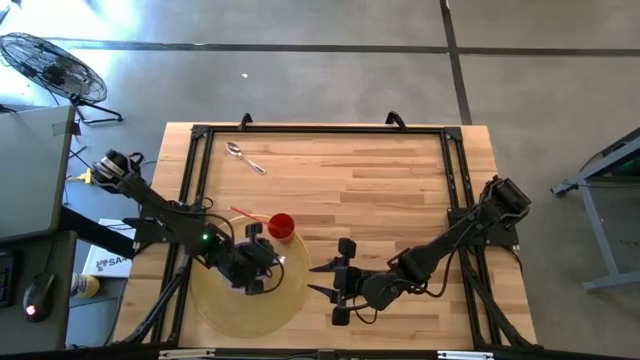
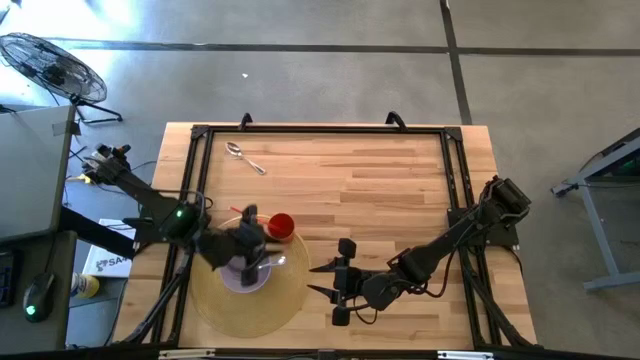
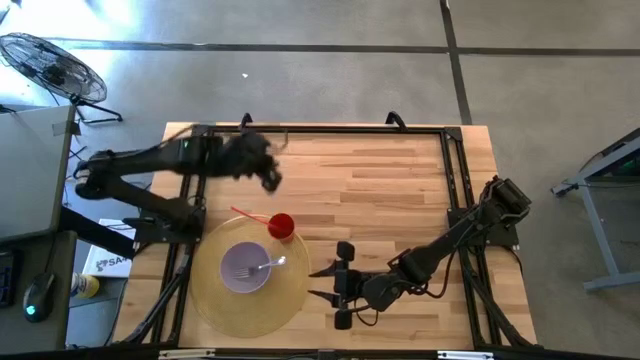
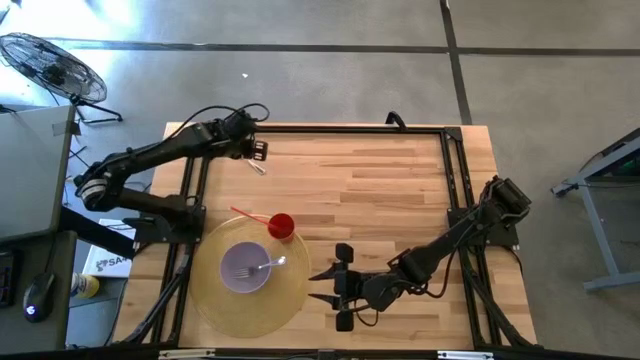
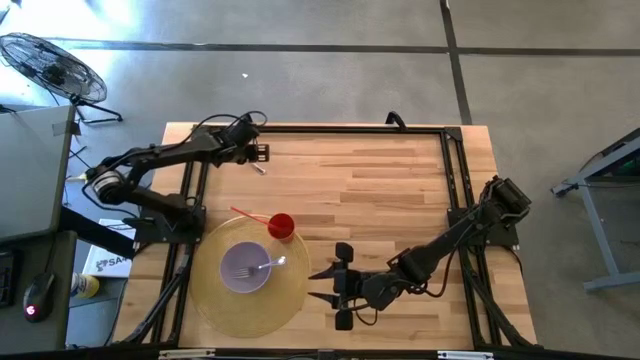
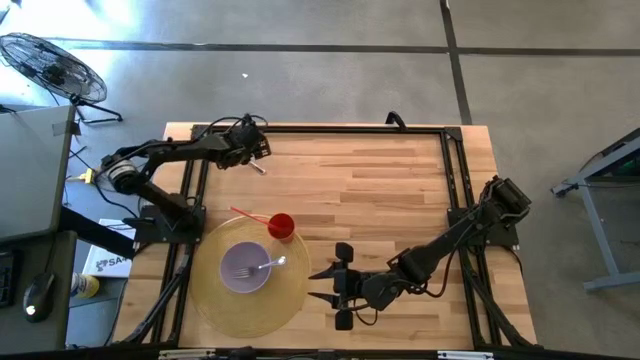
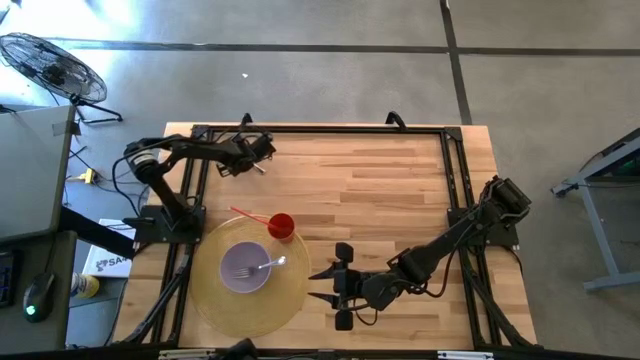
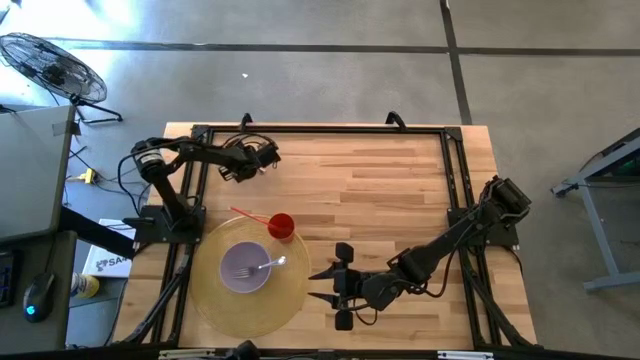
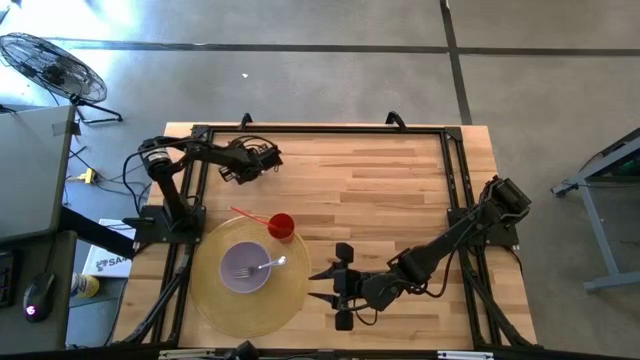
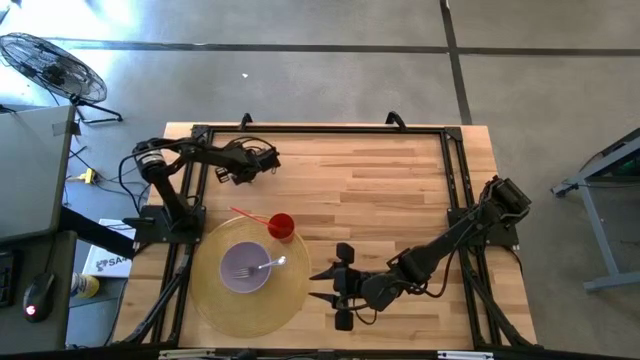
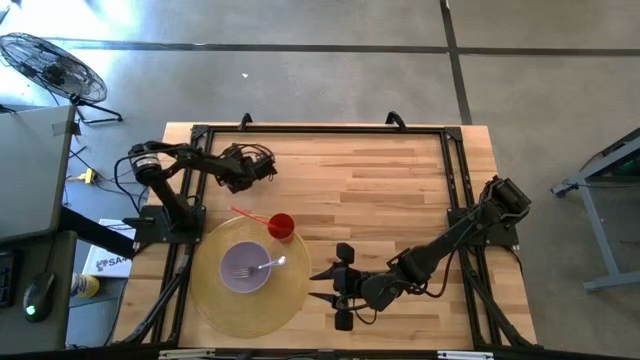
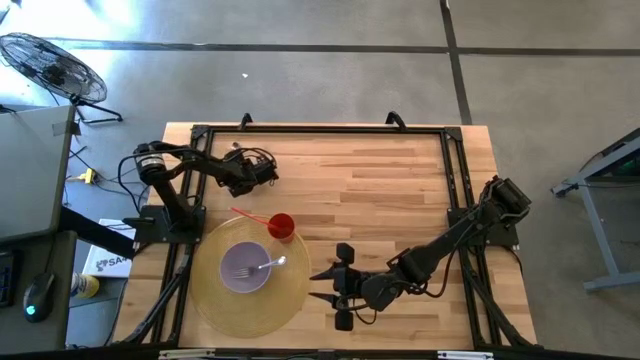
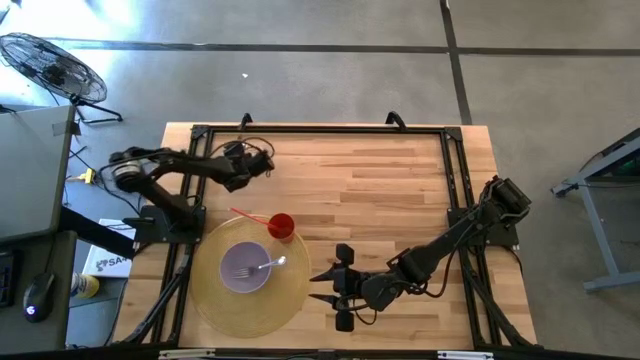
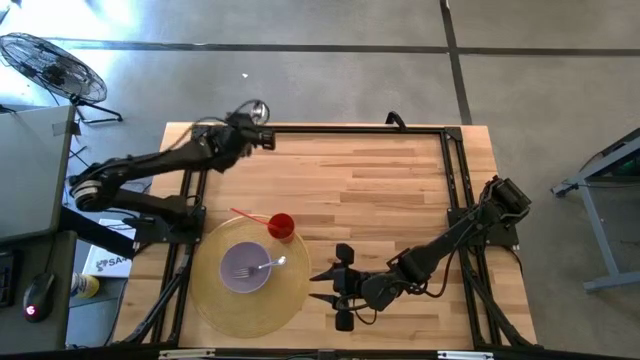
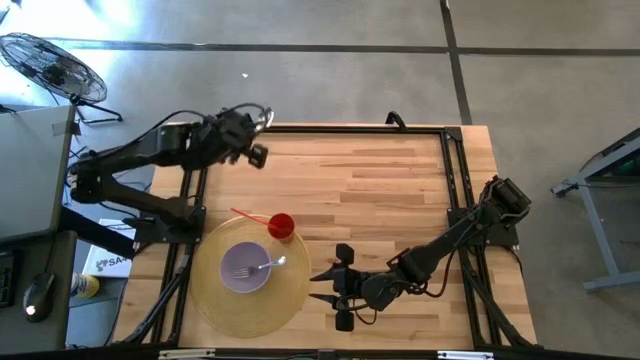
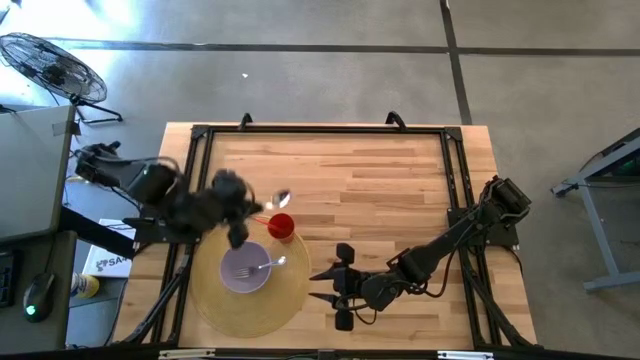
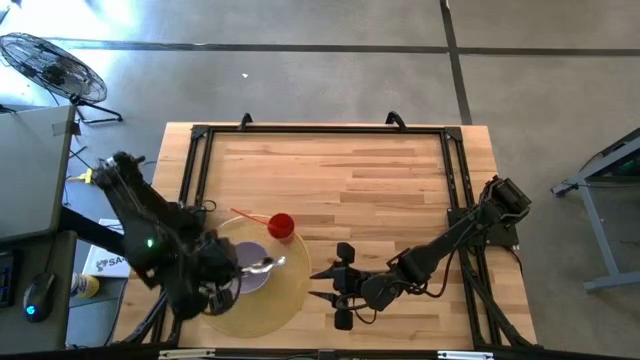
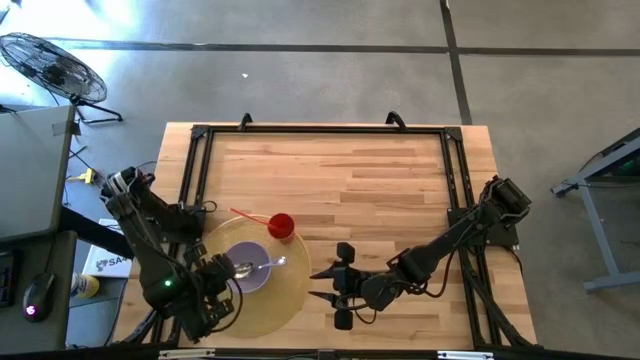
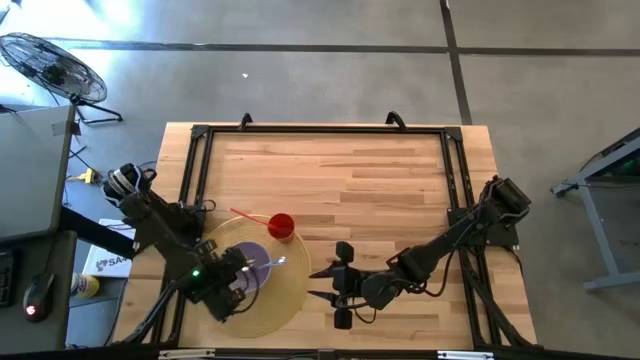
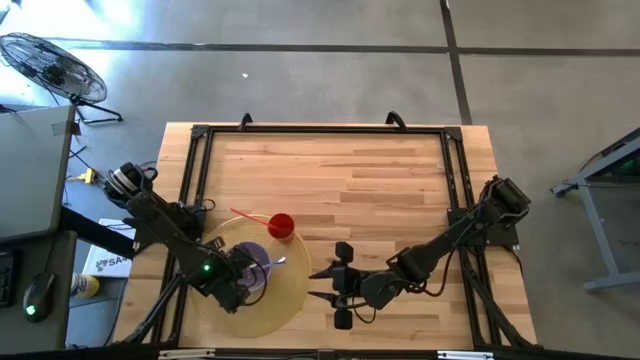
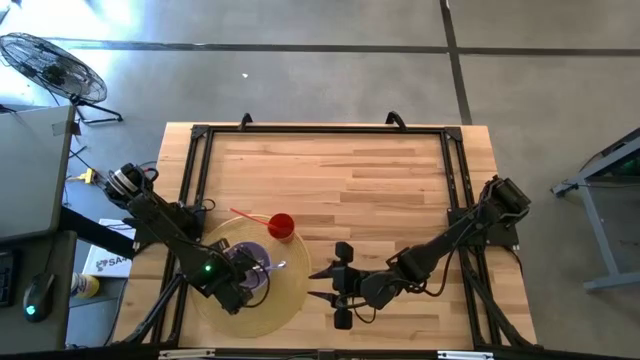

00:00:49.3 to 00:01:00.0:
Task: Pick & Place Utensil
Put the silver spoon into the purple bowl on the brown mat

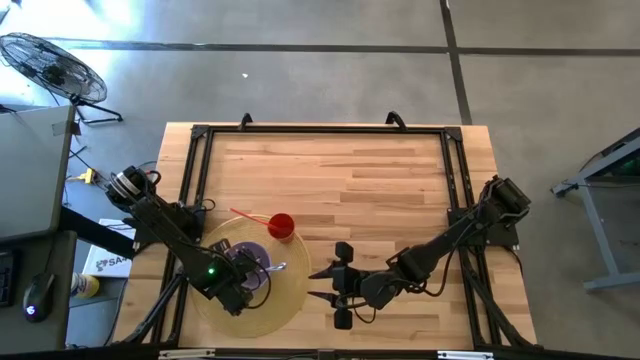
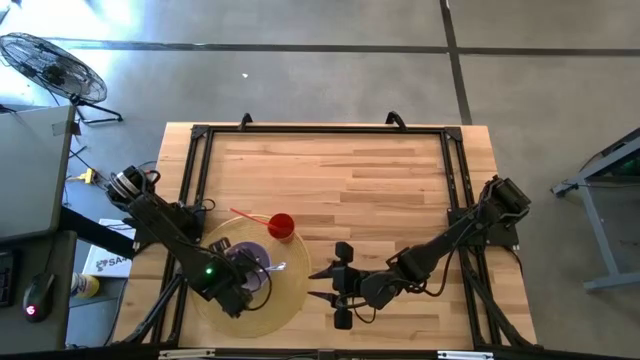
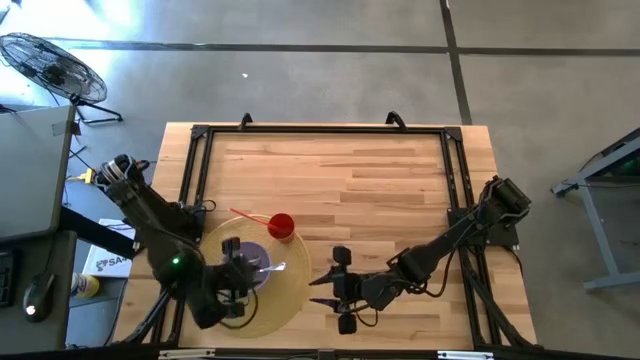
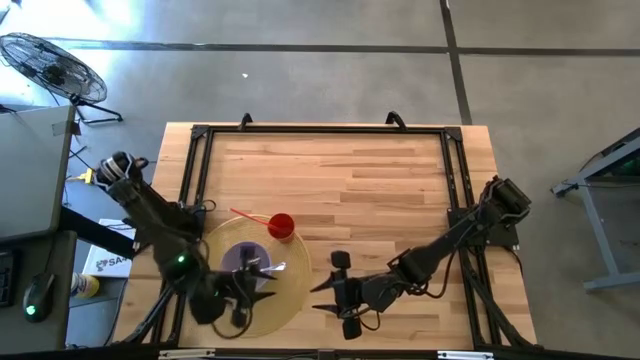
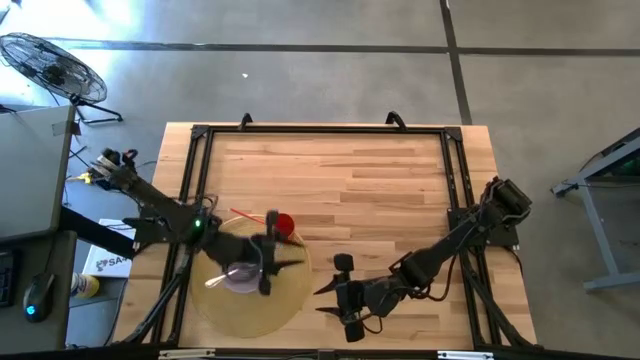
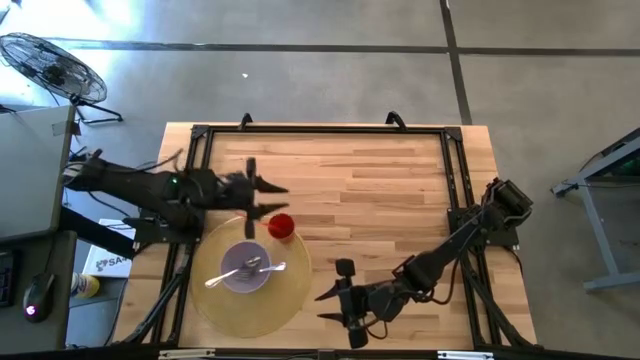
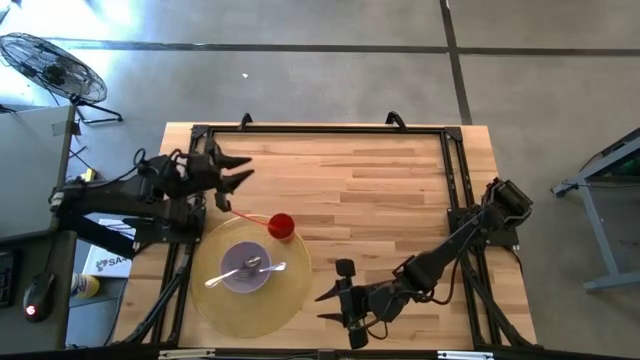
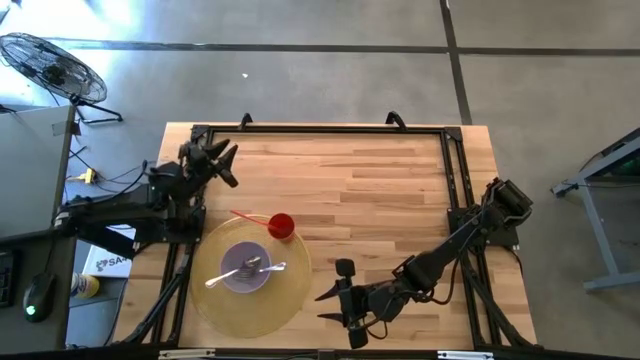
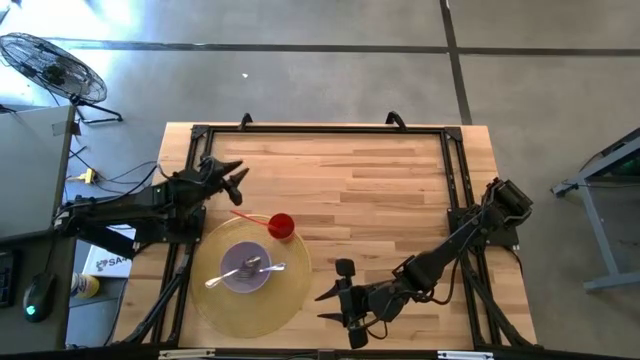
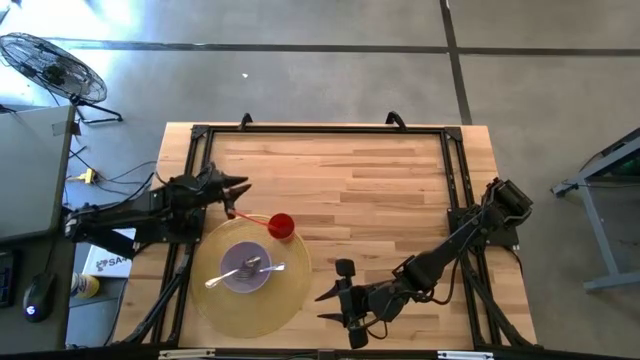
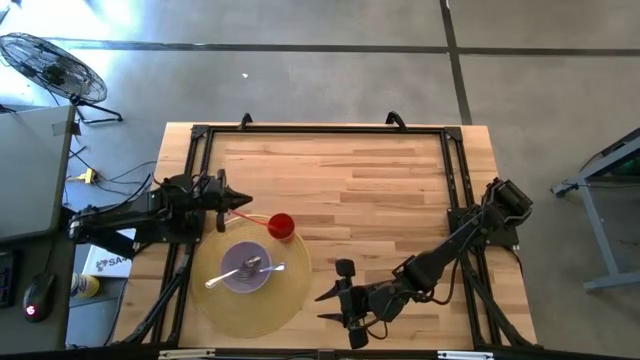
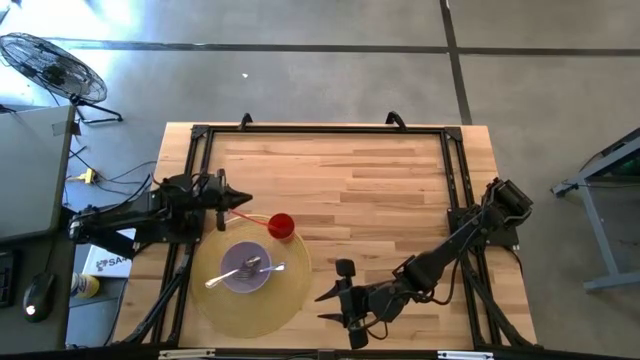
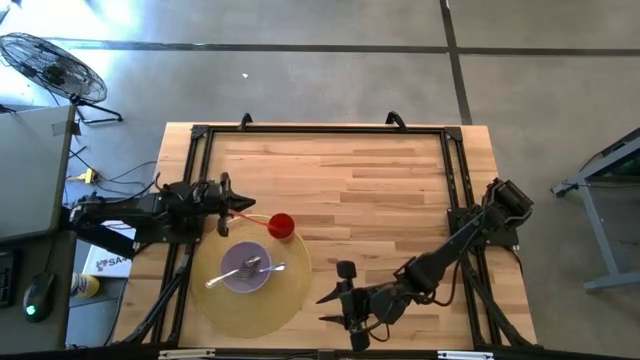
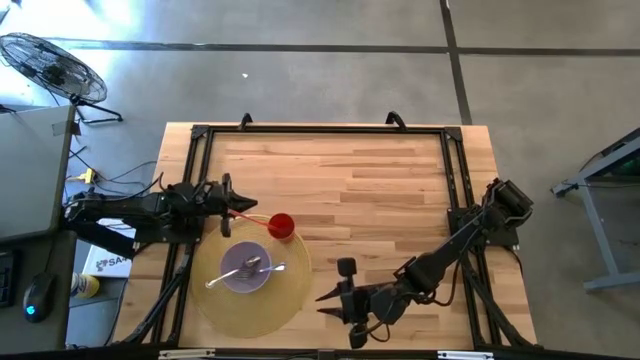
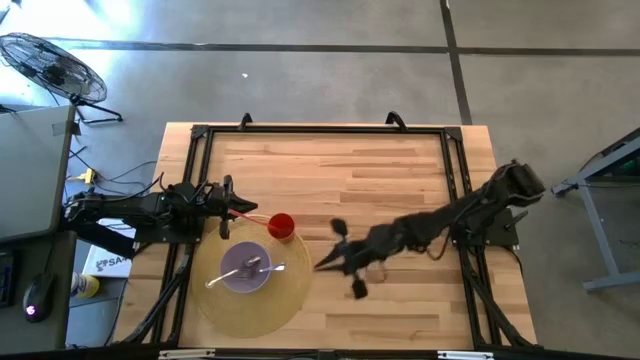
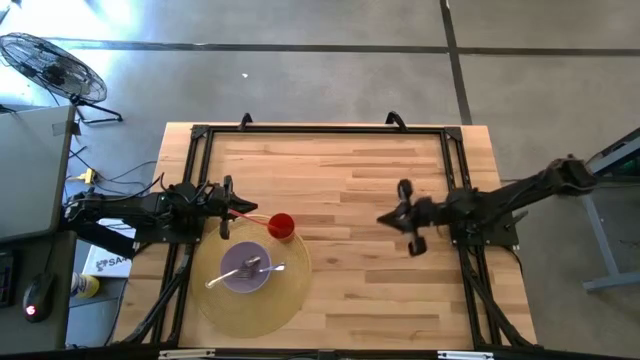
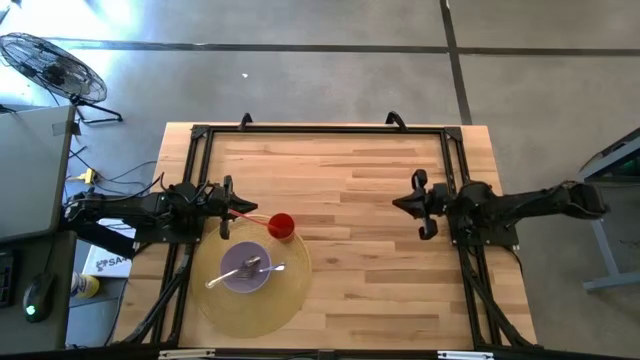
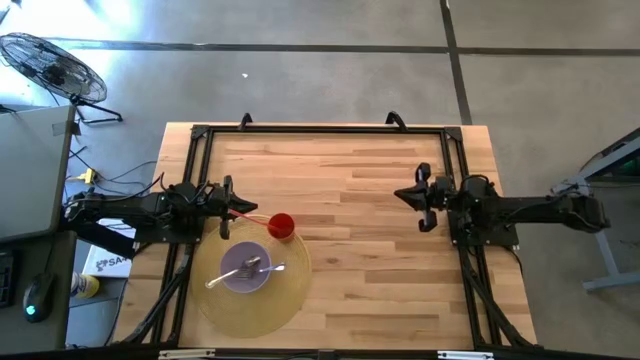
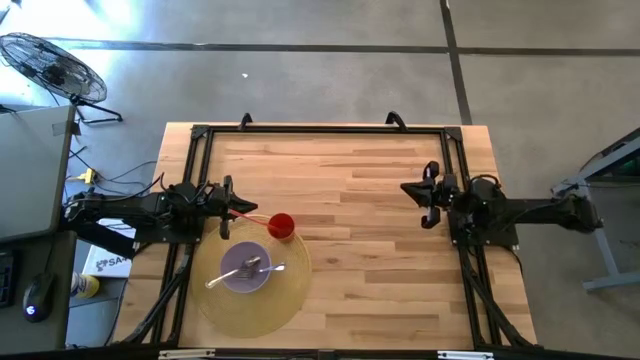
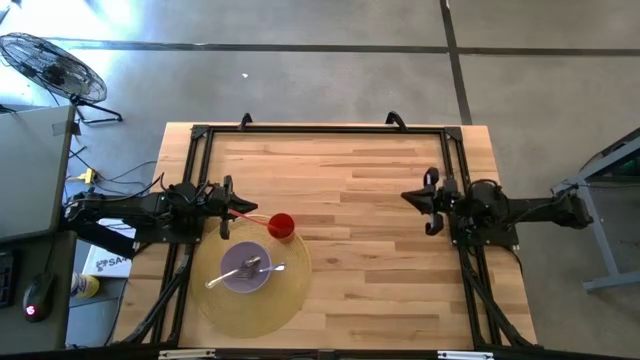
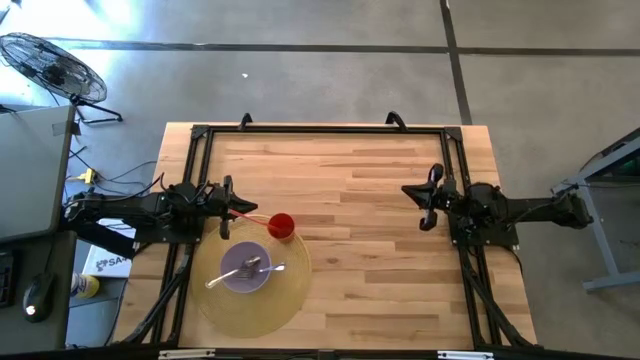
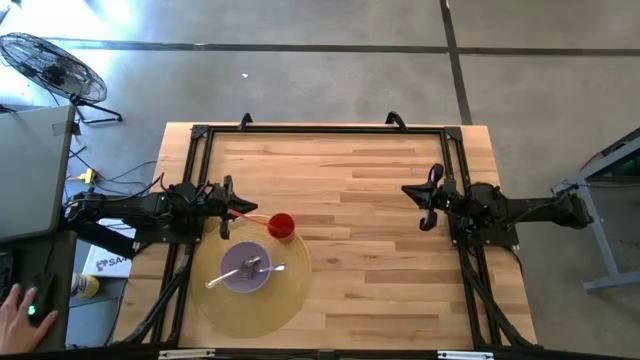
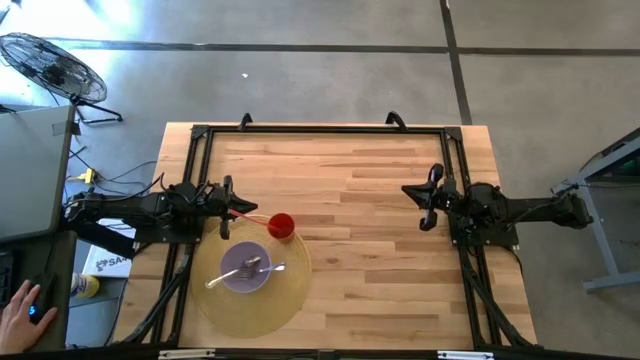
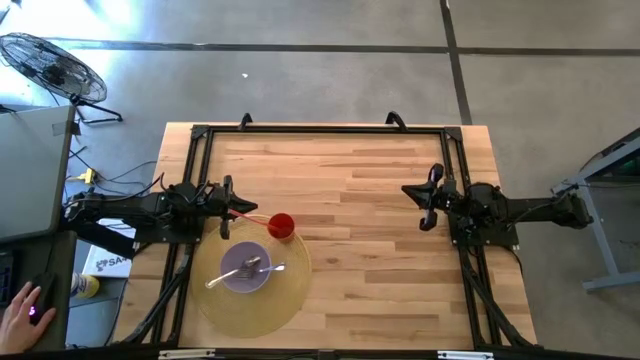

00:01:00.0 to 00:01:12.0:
Return to Home Position
